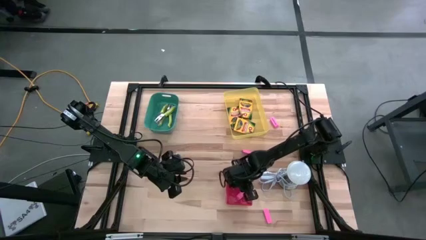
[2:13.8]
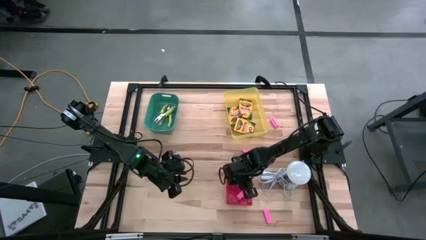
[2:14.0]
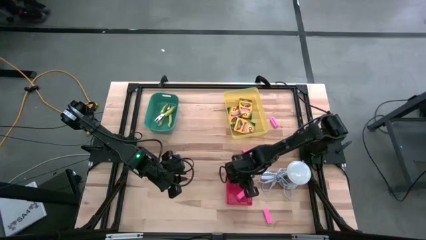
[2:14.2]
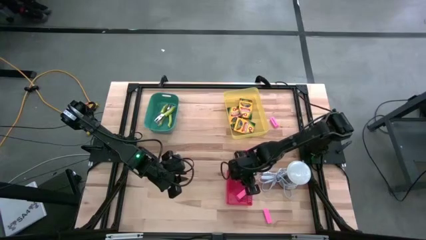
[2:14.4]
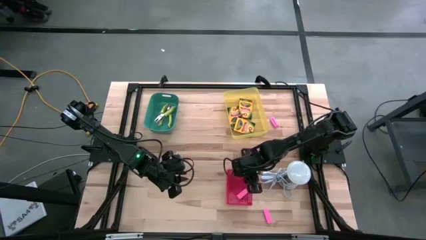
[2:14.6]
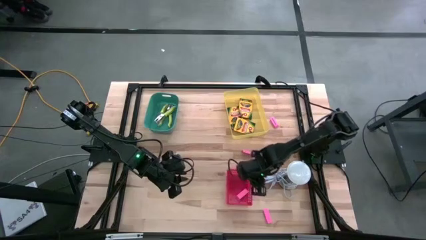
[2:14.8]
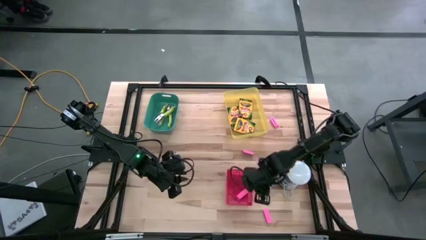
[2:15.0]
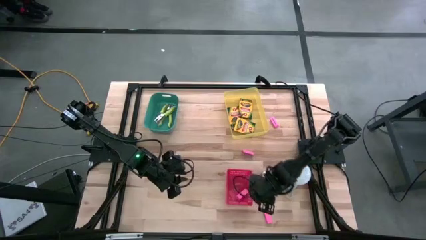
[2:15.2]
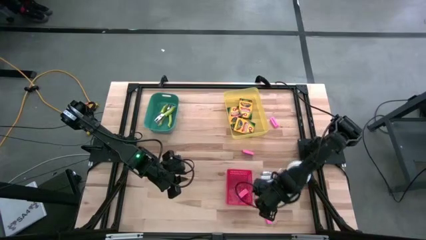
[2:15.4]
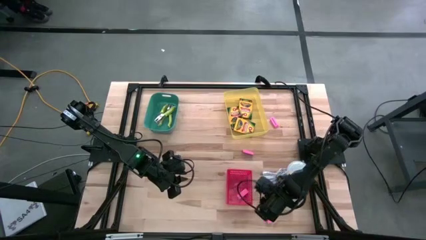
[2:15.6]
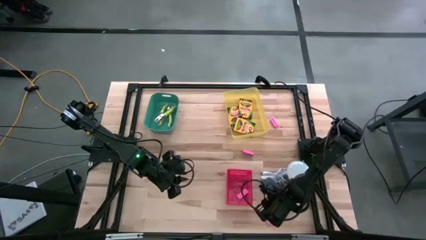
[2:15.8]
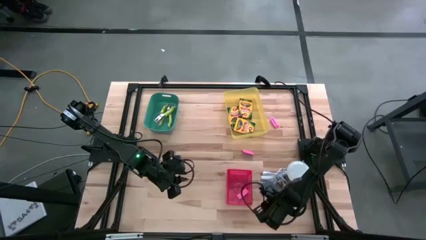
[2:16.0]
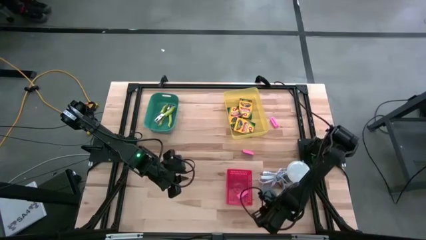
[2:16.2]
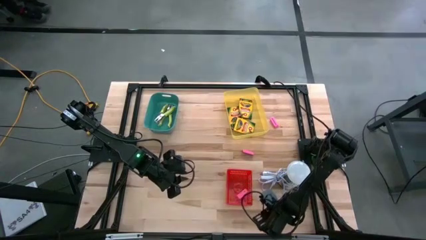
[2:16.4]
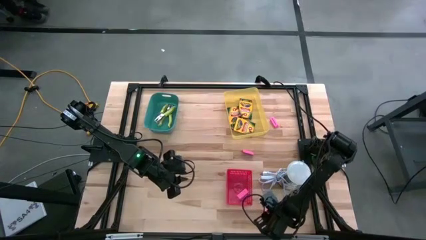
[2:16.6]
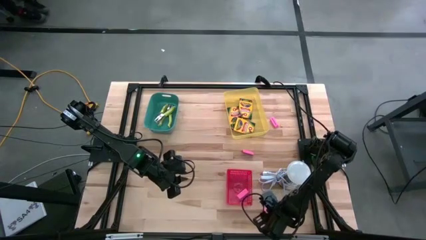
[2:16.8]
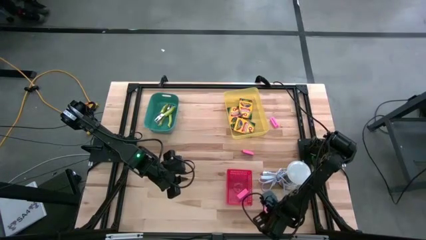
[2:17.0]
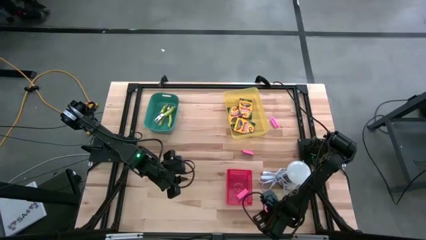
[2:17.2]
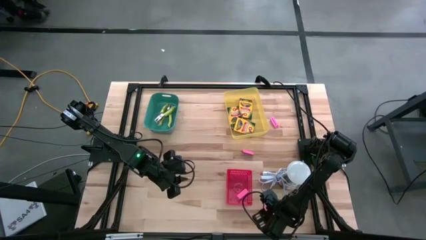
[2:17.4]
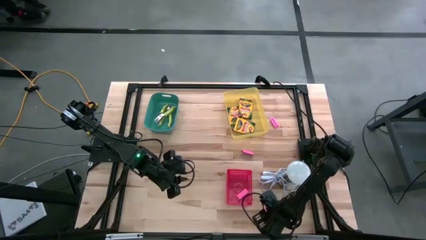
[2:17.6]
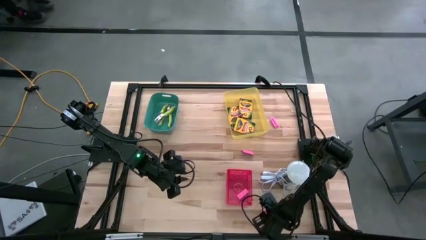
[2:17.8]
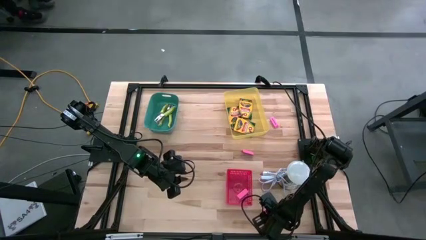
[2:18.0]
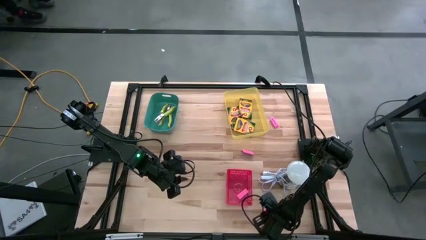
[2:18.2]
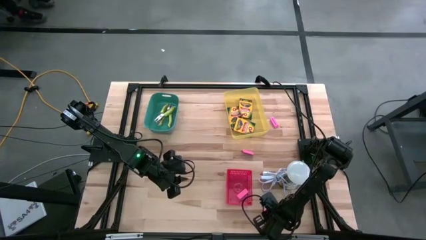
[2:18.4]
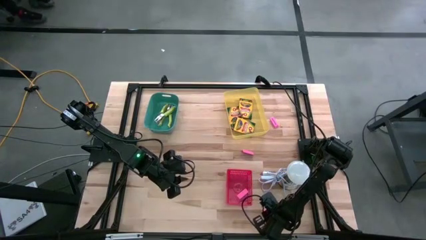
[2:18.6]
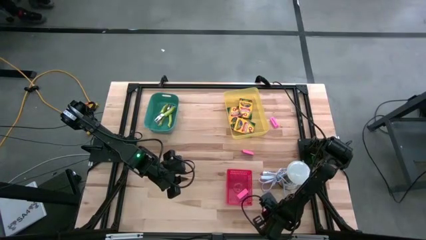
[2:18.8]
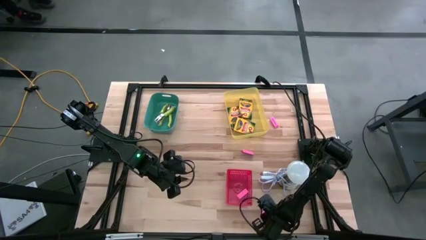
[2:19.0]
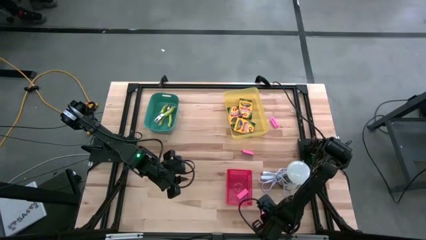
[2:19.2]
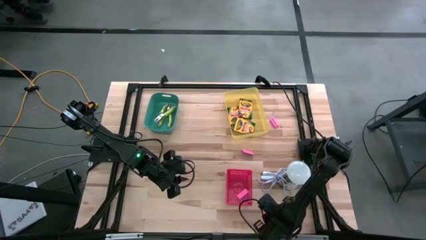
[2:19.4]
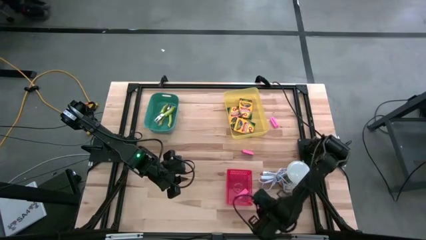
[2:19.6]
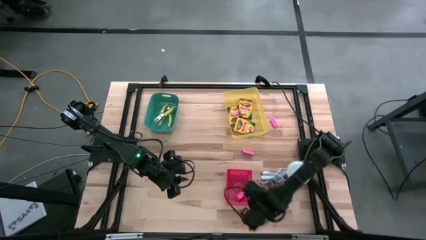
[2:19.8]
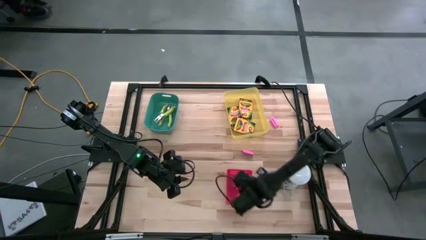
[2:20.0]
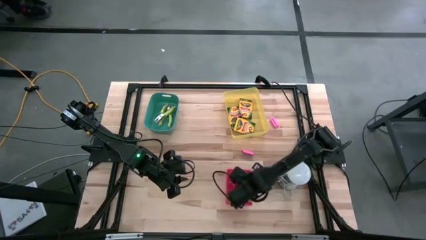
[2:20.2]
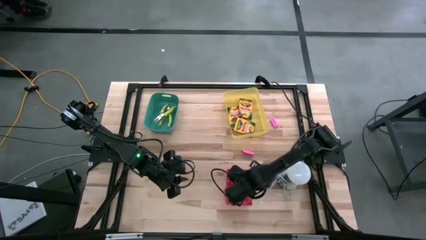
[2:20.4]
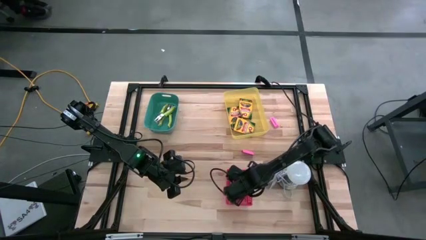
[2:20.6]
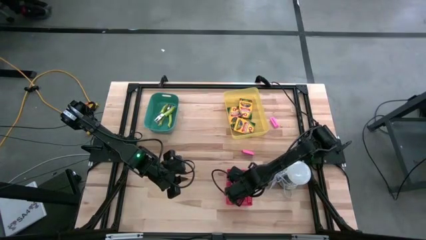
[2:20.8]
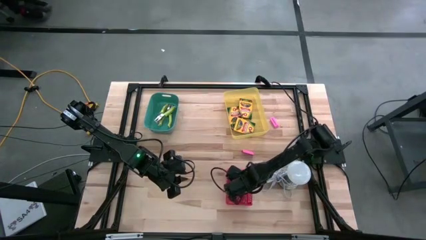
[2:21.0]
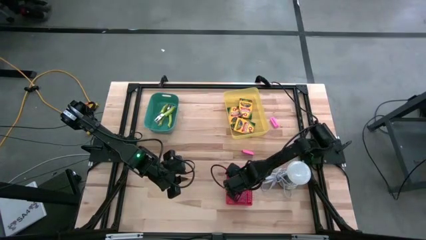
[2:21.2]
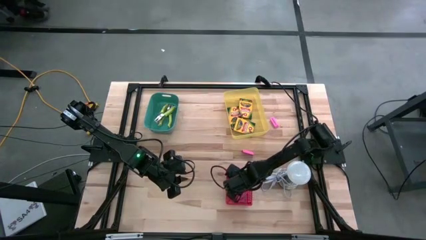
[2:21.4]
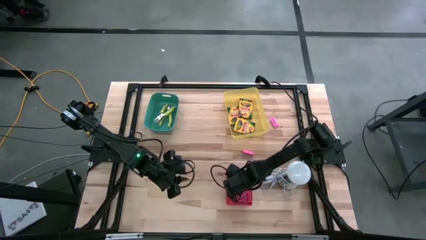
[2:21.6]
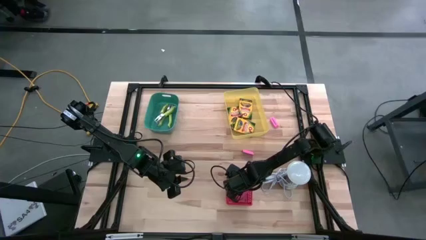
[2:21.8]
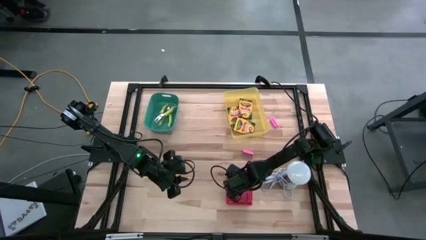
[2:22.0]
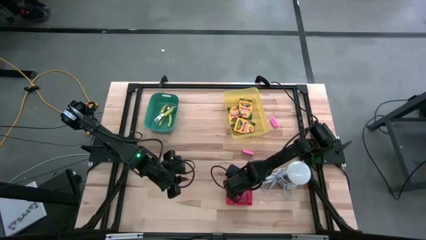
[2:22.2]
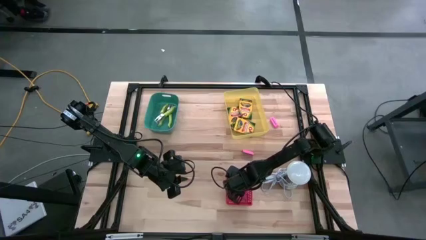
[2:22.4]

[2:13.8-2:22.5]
Task: Pick & Place School Supplies
Put the pink eraser into the red bin

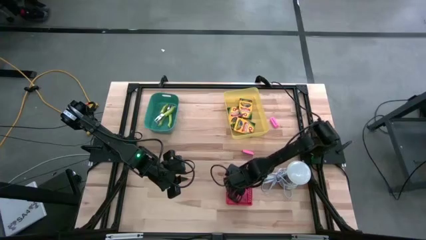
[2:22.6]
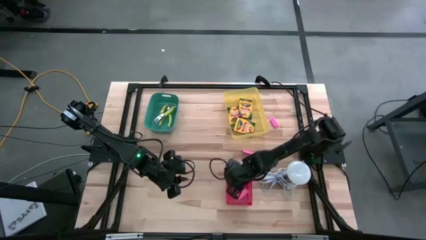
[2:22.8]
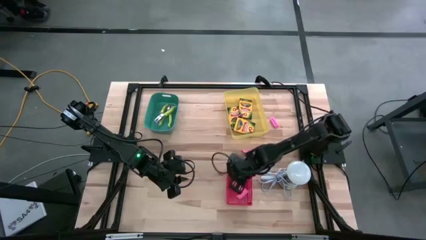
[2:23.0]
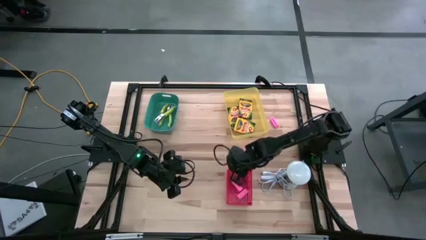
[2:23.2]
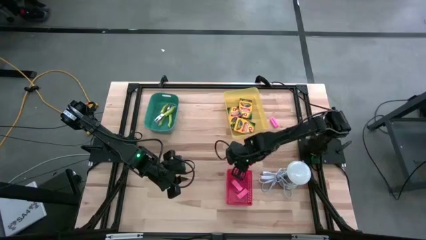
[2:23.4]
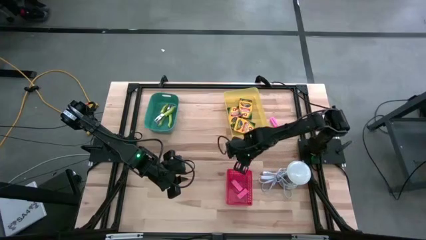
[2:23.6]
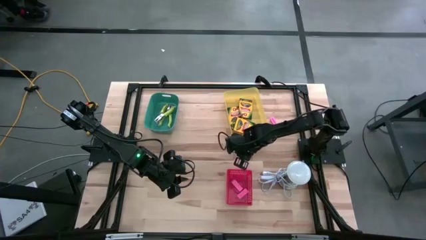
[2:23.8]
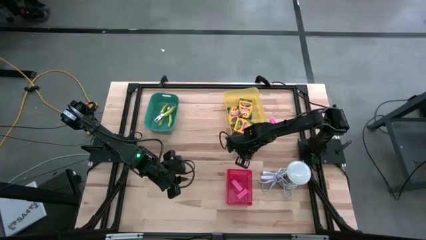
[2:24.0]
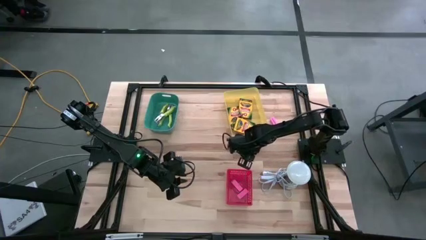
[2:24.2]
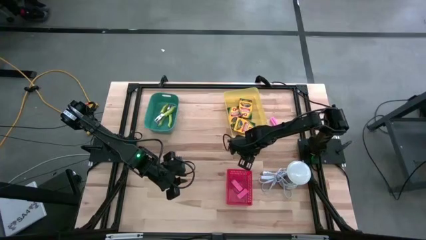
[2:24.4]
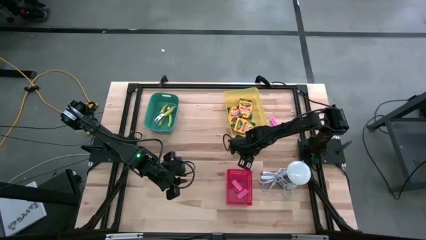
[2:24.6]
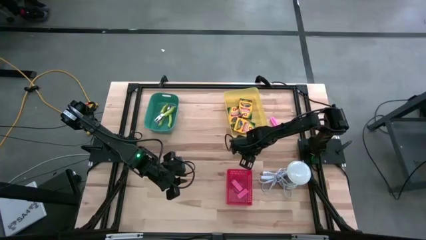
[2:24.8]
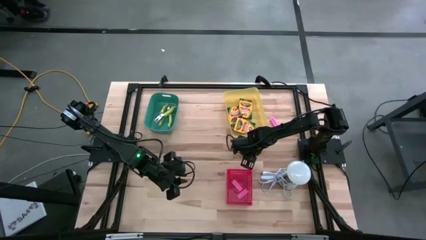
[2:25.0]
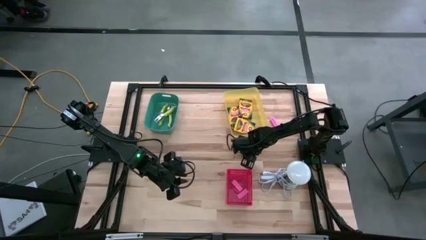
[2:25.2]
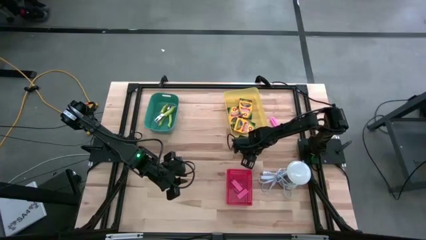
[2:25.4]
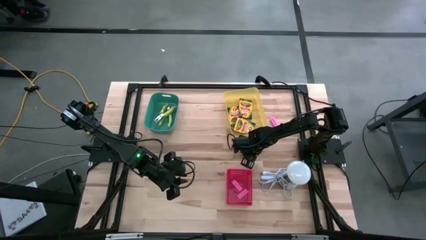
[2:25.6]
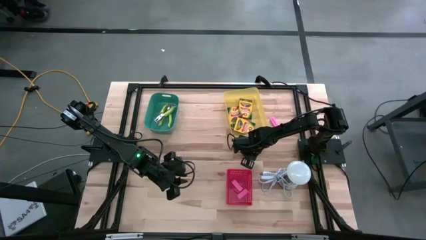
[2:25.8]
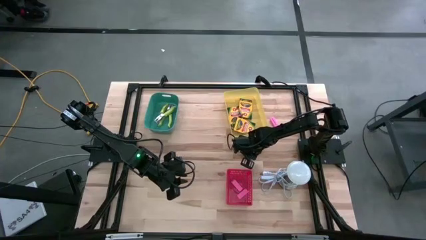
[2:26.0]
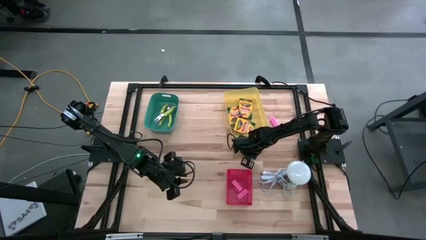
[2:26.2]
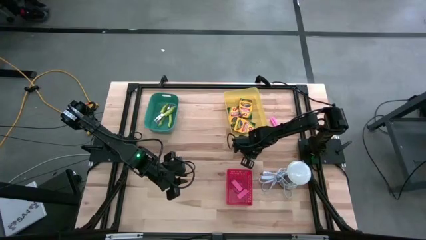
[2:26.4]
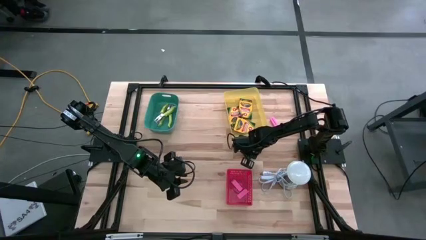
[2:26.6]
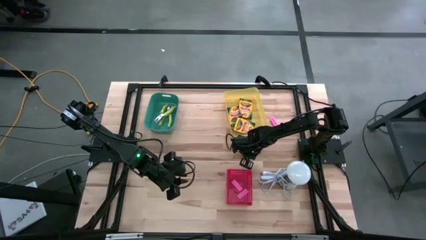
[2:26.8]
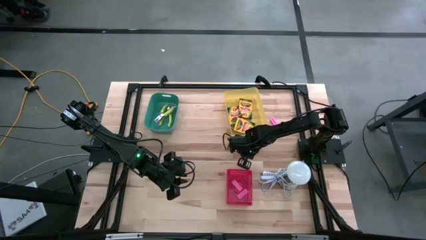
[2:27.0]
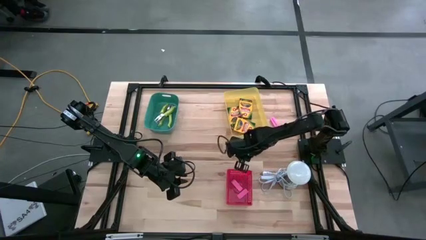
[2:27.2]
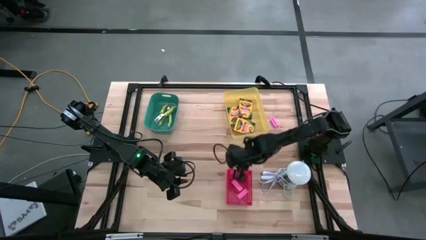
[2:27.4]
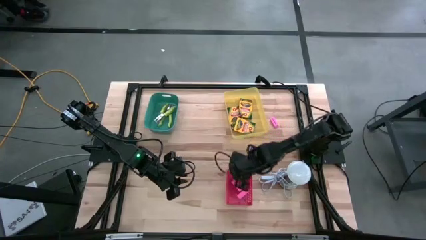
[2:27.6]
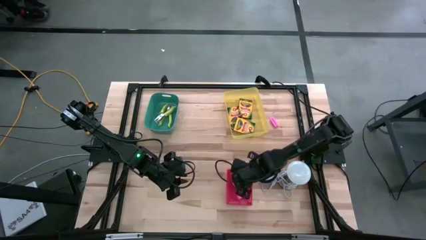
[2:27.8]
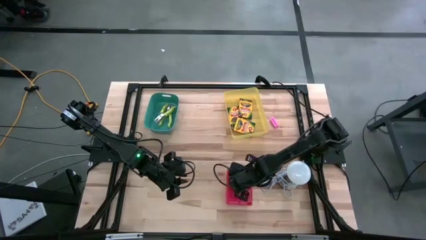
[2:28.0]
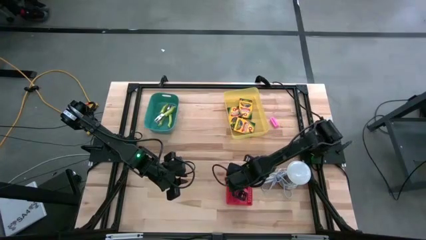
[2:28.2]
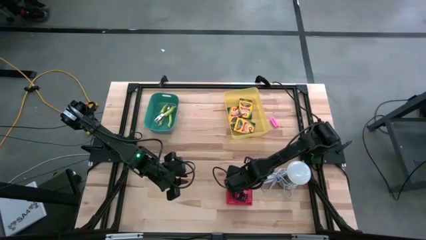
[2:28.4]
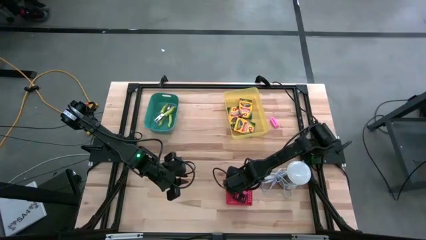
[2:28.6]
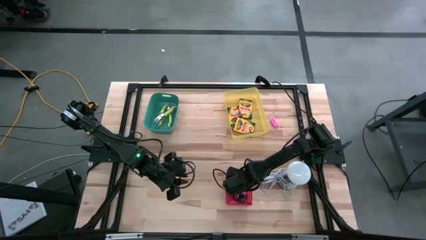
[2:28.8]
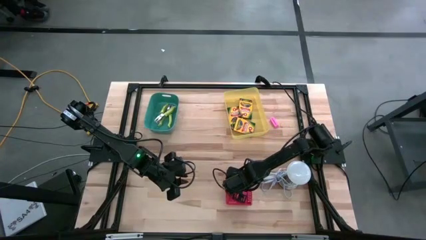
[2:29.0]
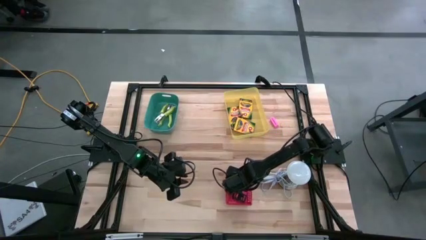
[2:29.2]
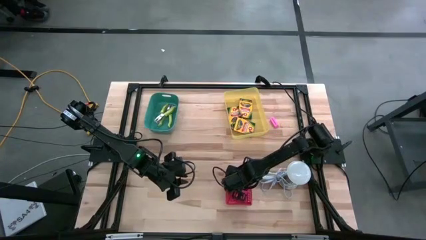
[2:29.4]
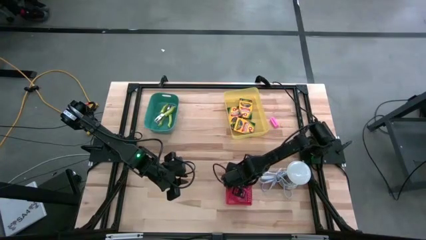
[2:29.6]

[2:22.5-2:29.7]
Put the pink eraser into the red bin
